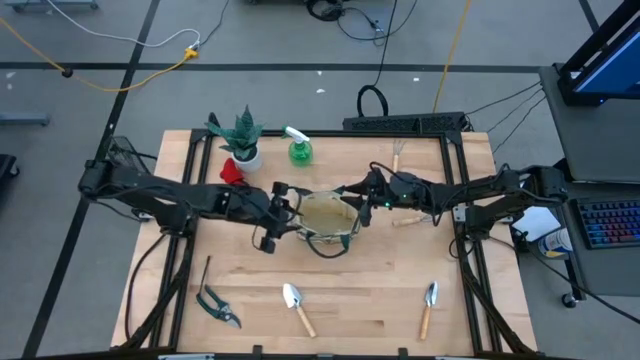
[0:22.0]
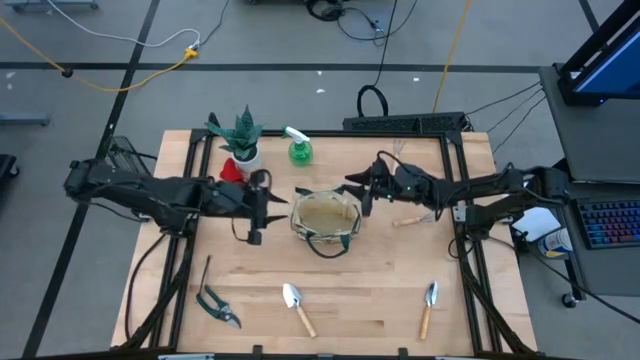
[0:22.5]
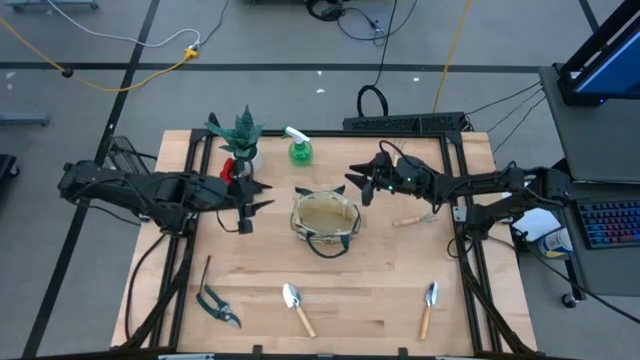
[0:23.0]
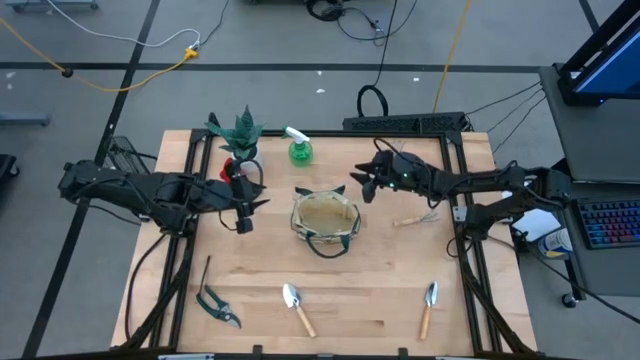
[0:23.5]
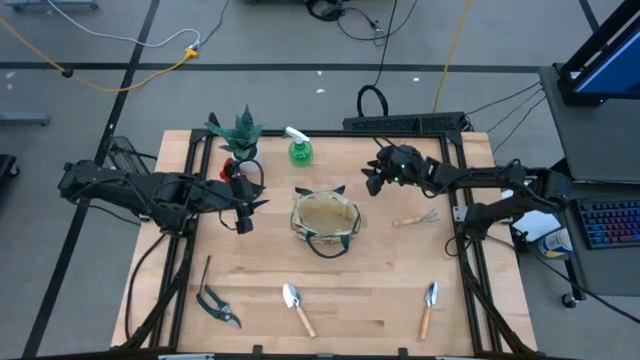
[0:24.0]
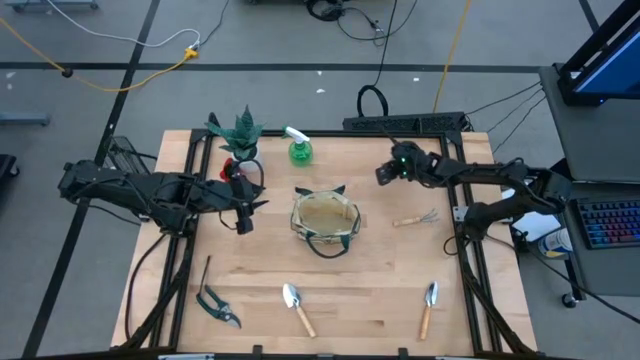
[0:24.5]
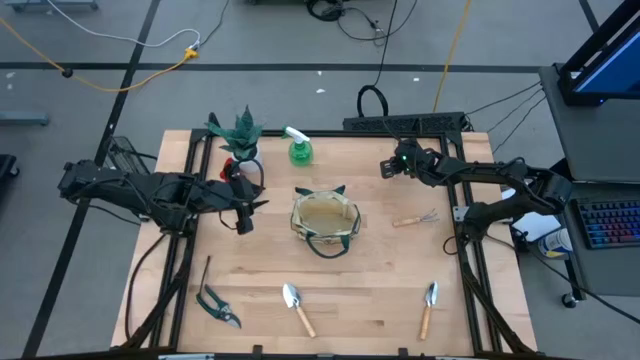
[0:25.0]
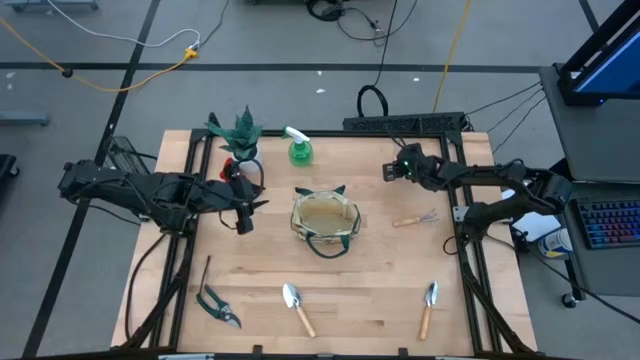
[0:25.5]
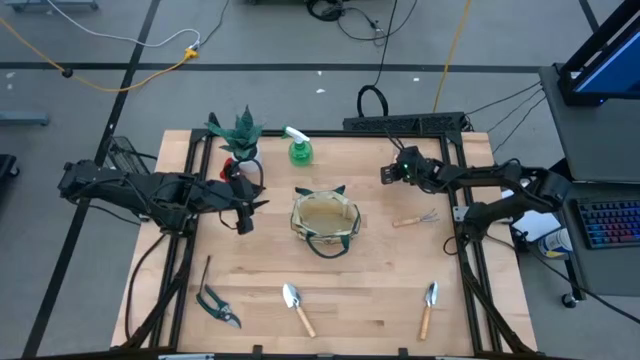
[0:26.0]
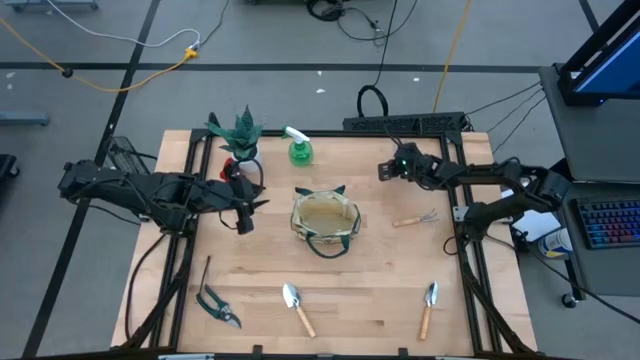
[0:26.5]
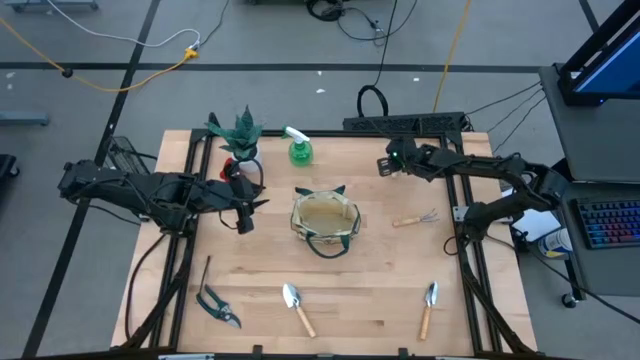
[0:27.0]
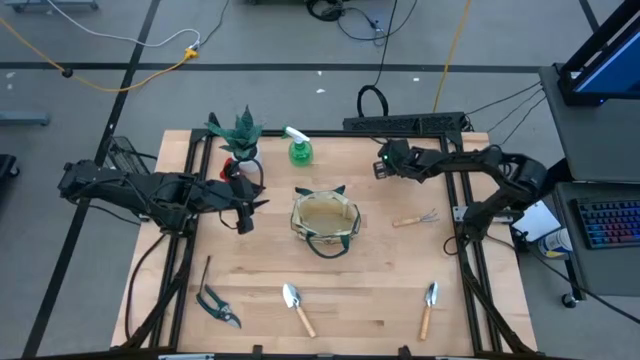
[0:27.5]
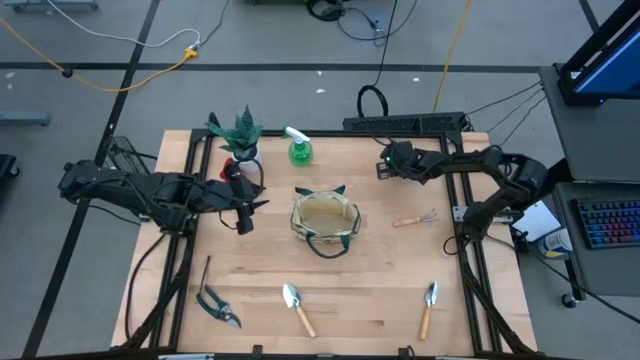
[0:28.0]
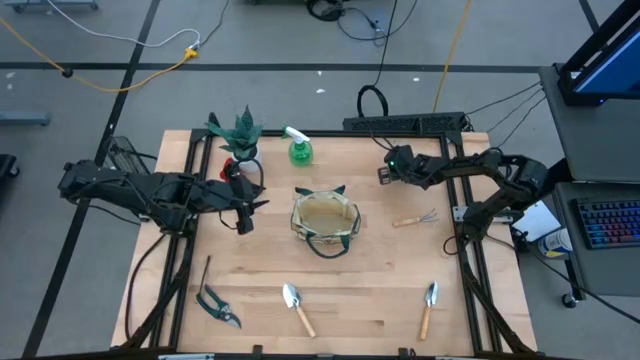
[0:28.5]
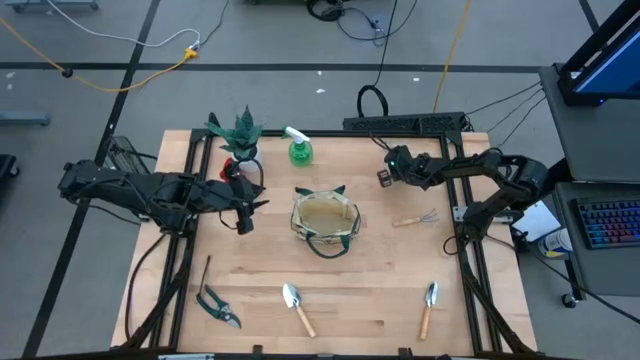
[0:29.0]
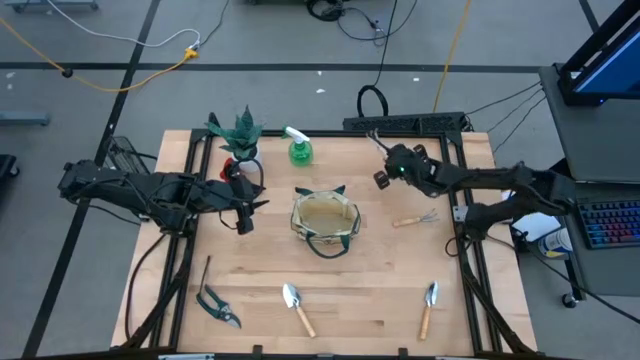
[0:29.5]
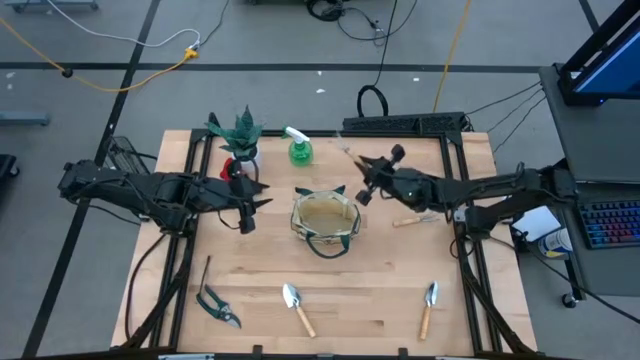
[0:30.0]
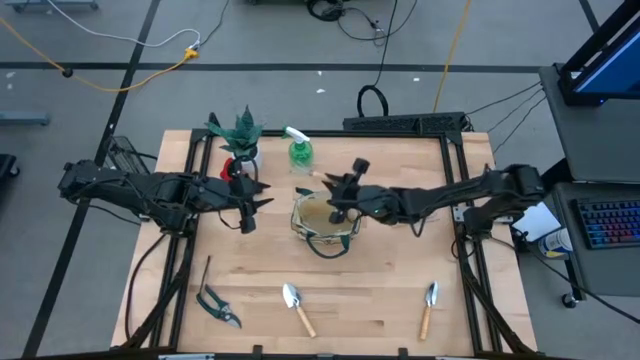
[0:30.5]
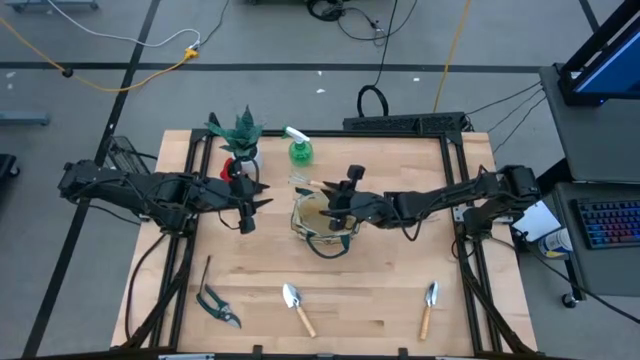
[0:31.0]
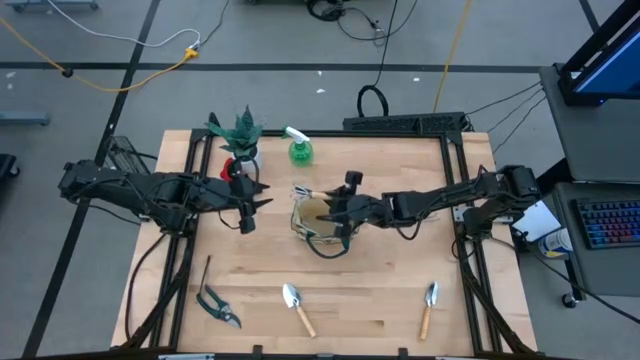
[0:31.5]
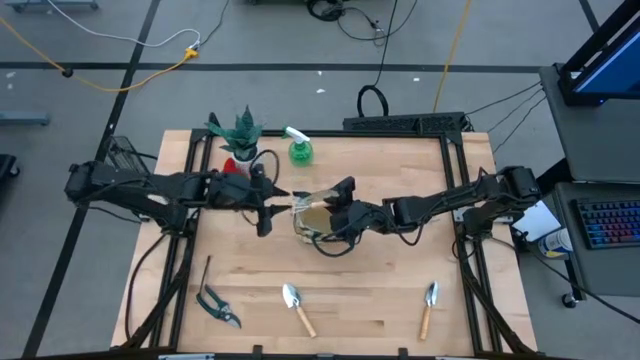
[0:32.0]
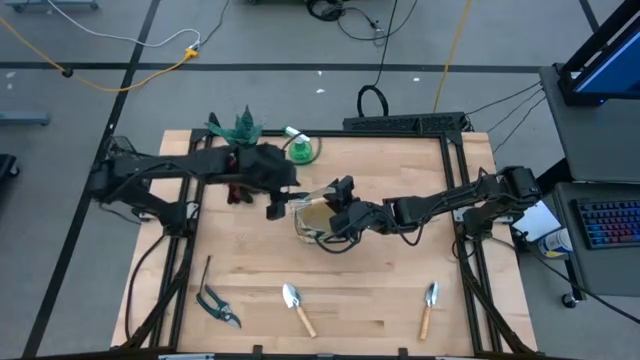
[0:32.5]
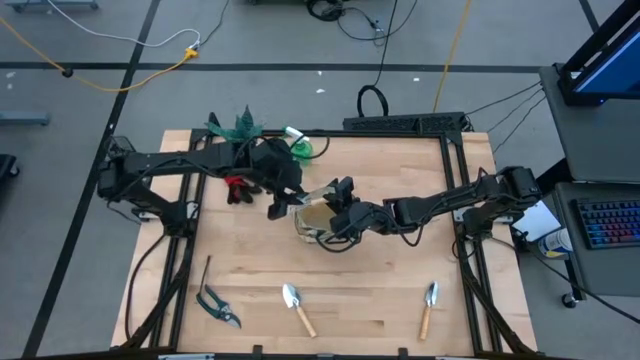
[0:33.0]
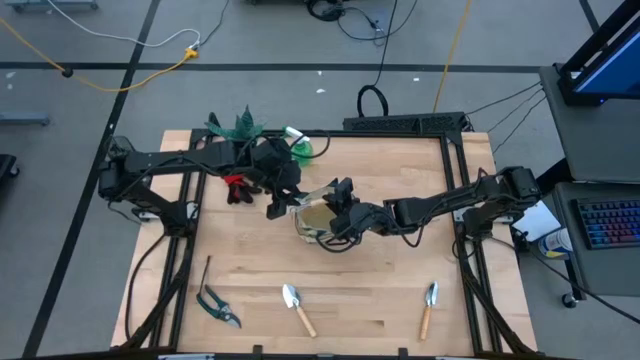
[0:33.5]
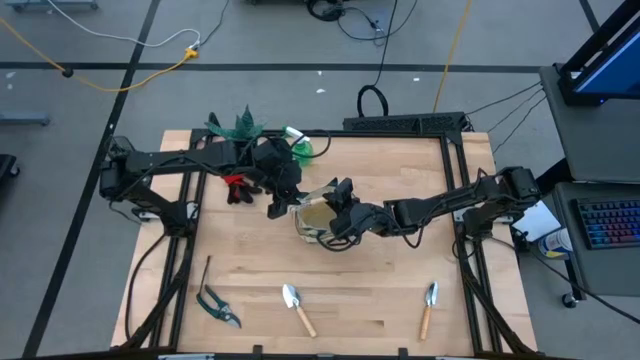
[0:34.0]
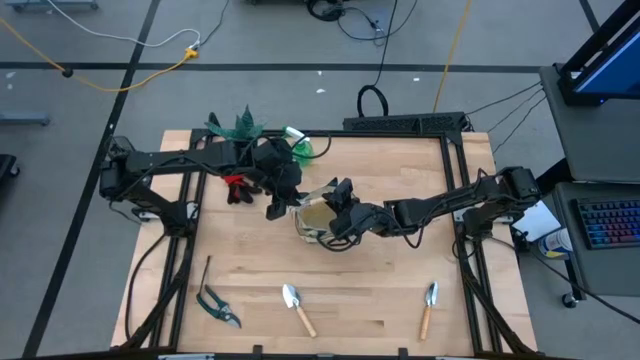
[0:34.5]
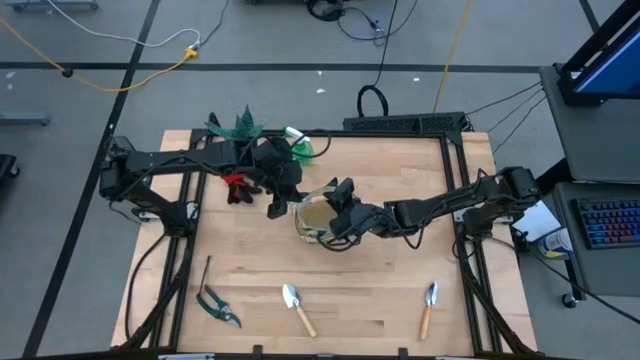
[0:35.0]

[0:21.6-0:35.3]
Task: Pick & Place Garden tools in Gardening bag
Put the light brown hand rake into the gardening bag

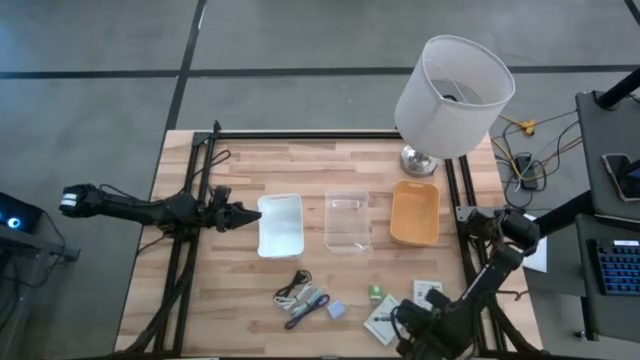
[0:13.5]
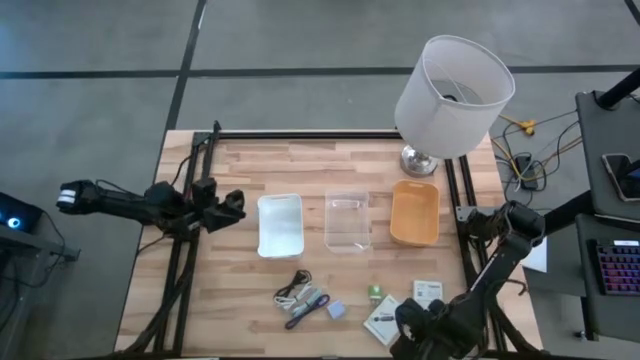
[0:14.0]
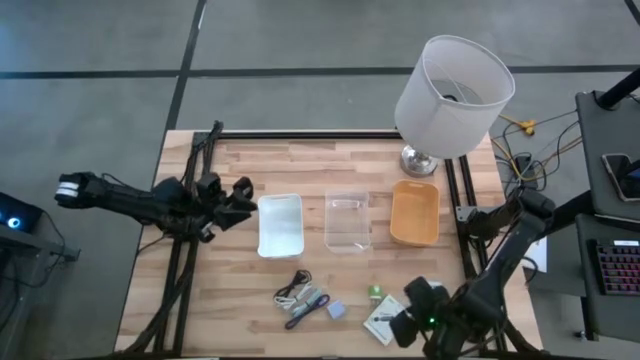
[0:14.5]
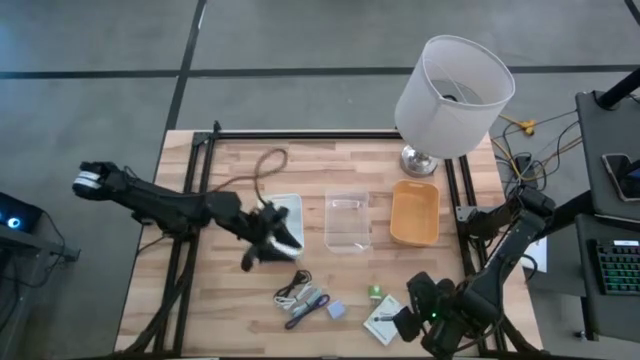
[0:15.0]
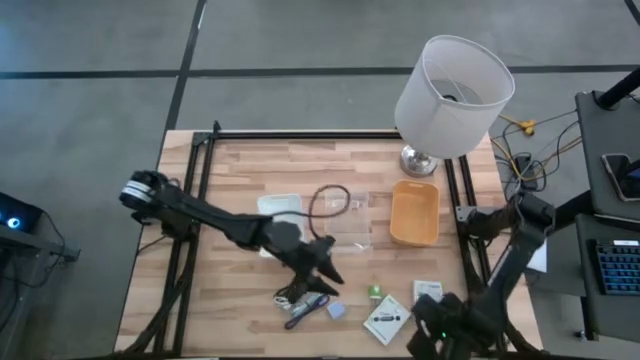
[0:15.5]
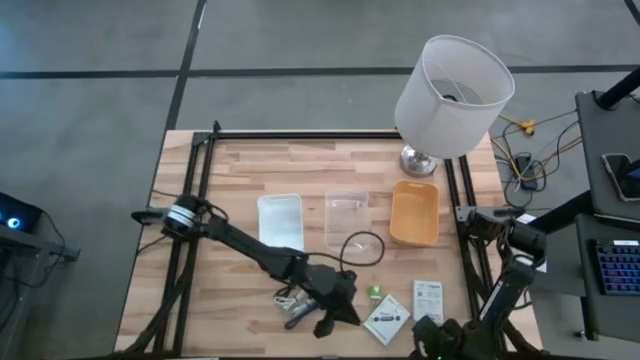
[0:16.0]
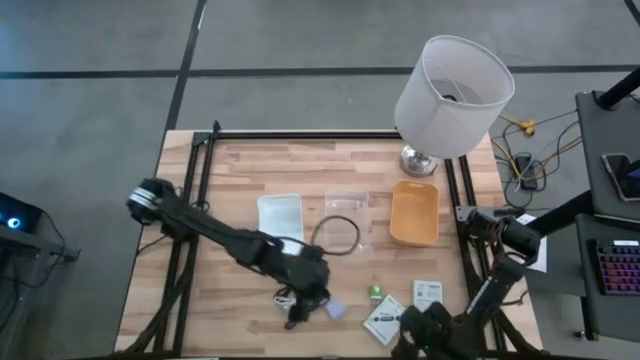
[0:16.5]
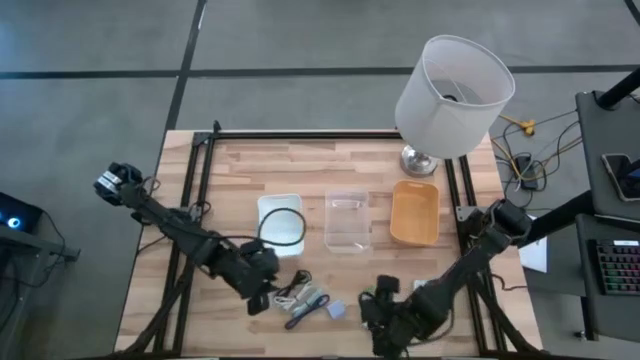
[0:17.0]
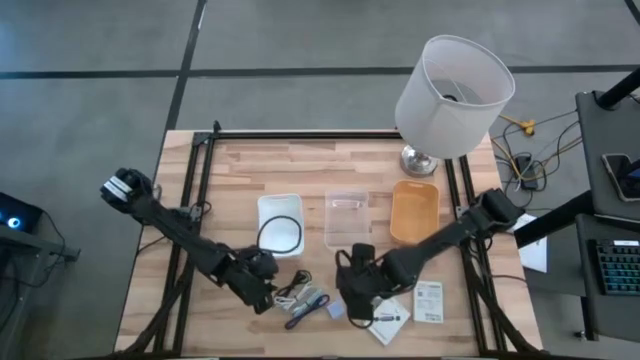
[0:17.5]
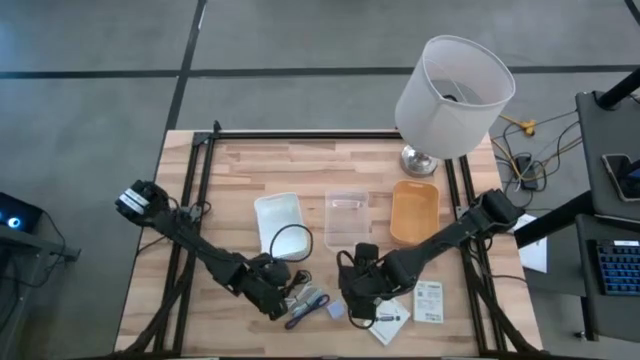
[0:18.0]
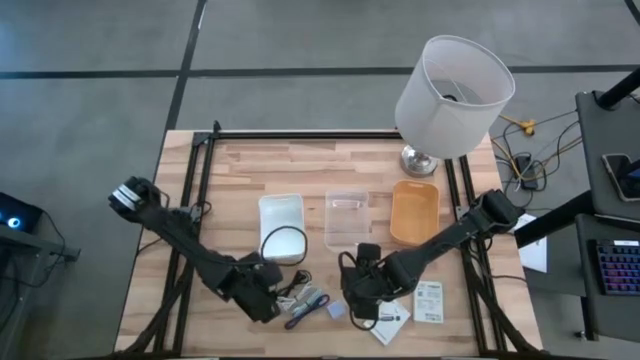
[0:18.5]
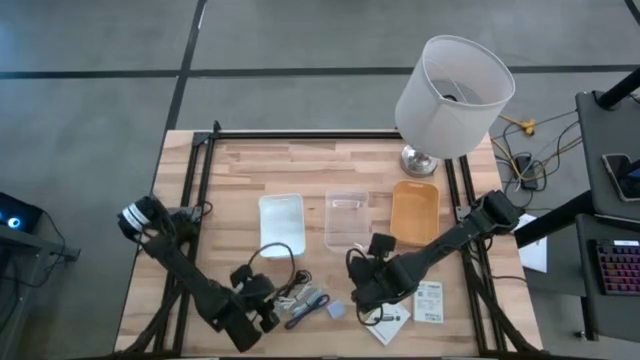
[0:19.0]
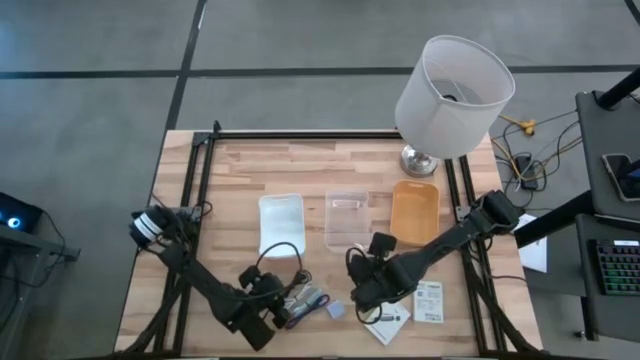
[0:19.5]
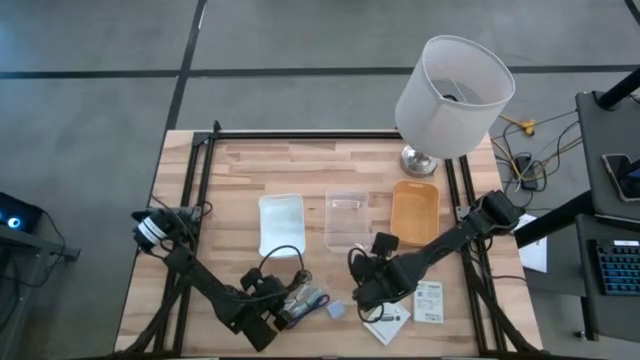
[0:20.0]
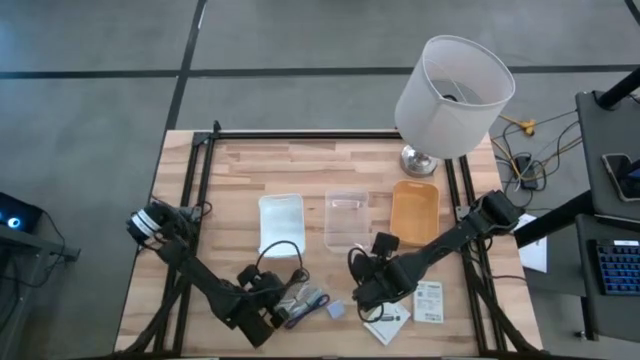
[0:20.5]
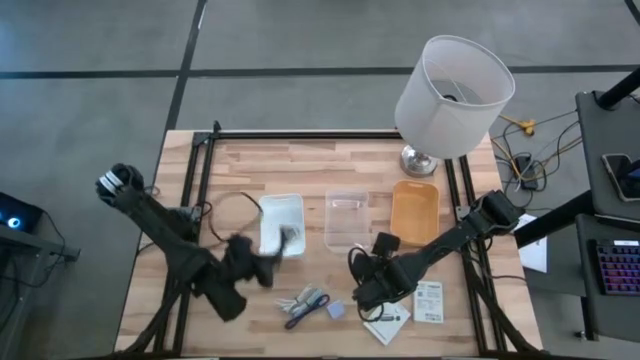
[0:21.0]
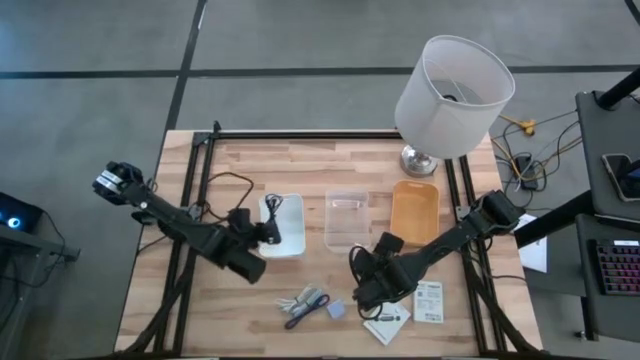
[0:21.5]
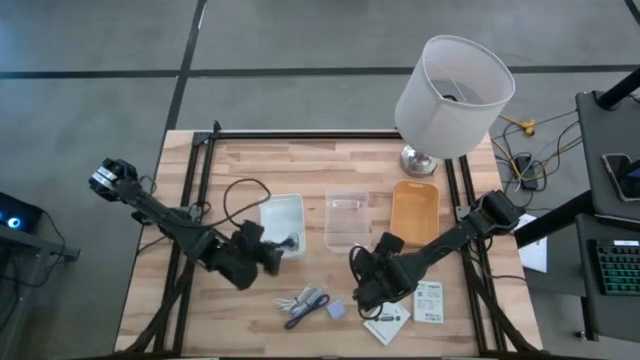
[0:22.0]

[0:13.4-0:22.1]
Task: Pick and place items into bin
Put the black charger cable into the white bin
